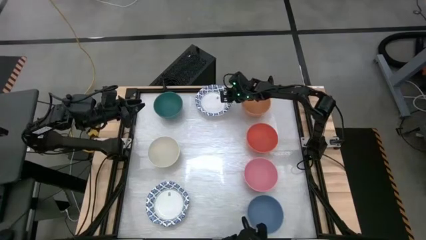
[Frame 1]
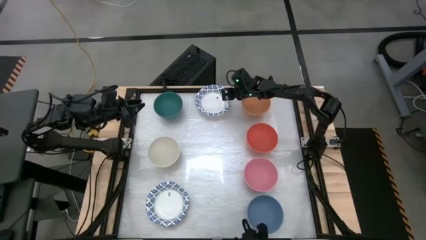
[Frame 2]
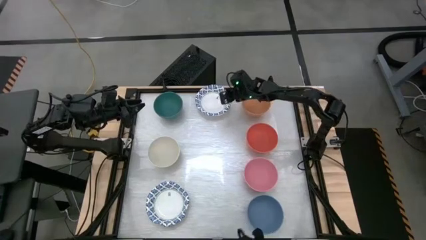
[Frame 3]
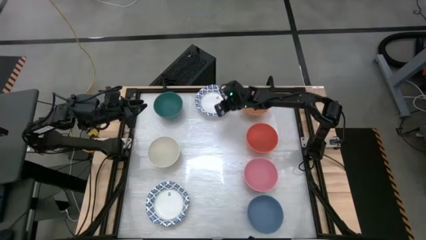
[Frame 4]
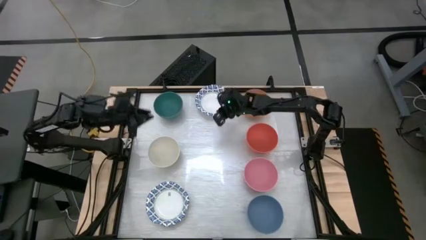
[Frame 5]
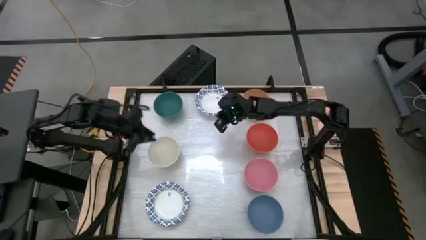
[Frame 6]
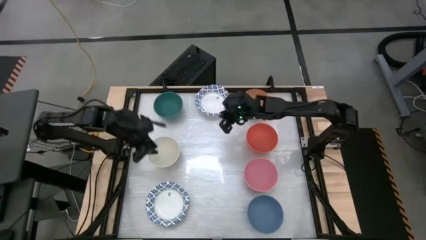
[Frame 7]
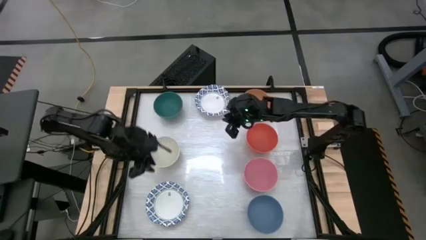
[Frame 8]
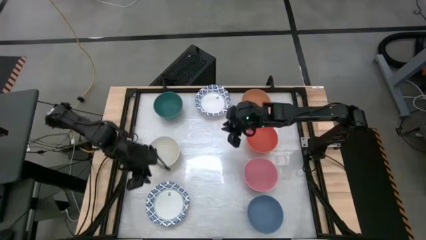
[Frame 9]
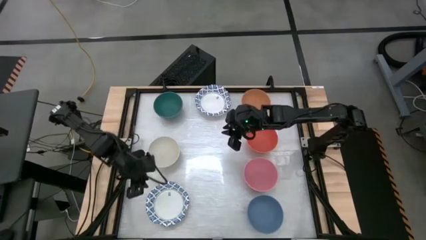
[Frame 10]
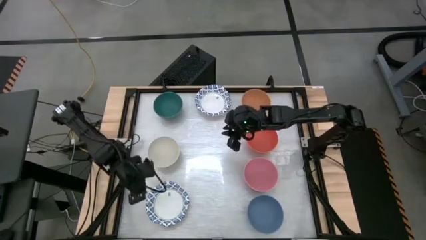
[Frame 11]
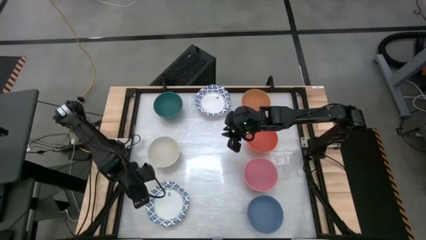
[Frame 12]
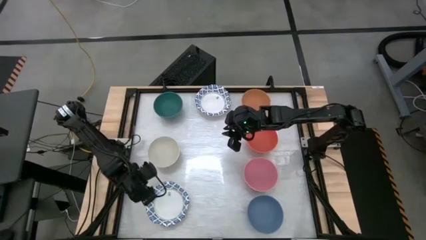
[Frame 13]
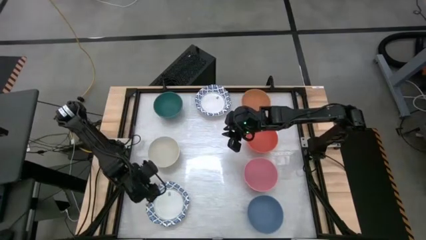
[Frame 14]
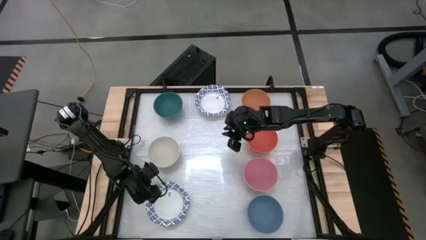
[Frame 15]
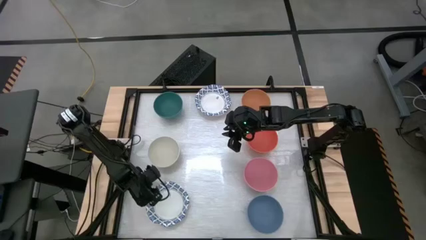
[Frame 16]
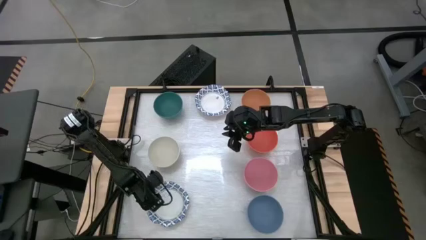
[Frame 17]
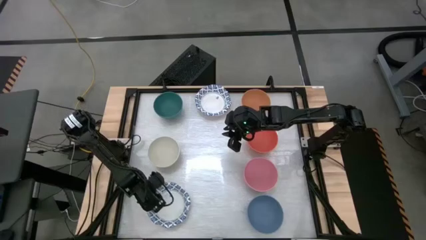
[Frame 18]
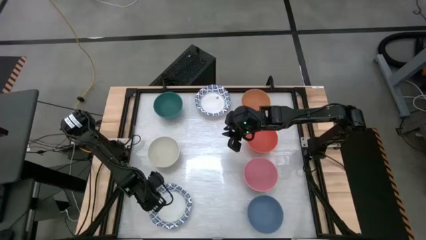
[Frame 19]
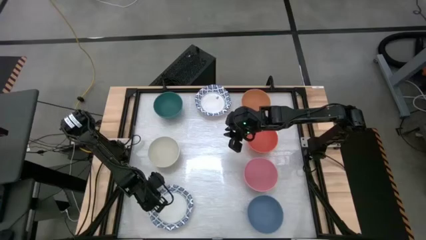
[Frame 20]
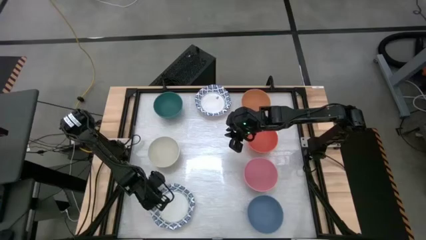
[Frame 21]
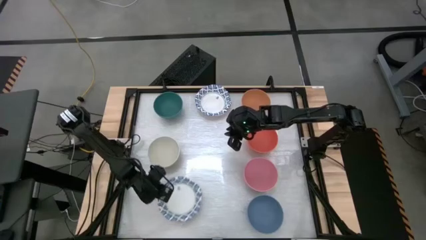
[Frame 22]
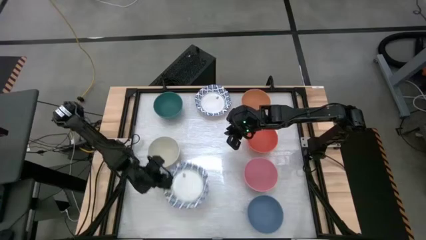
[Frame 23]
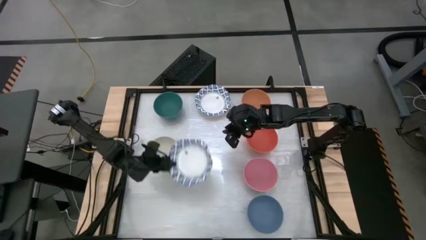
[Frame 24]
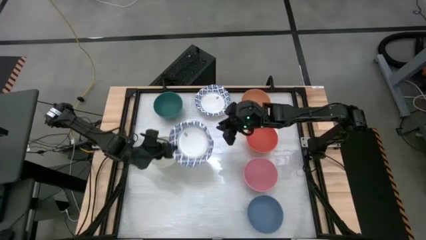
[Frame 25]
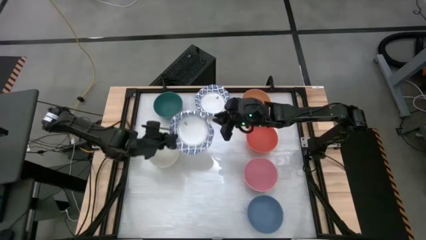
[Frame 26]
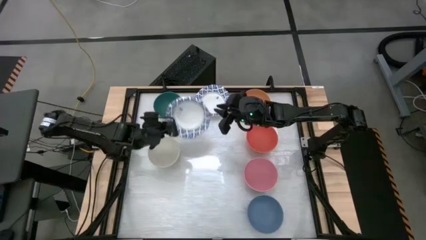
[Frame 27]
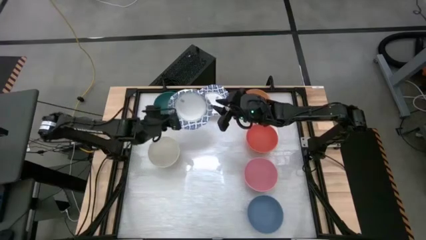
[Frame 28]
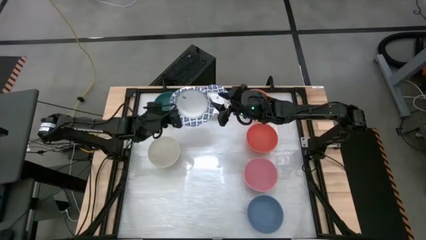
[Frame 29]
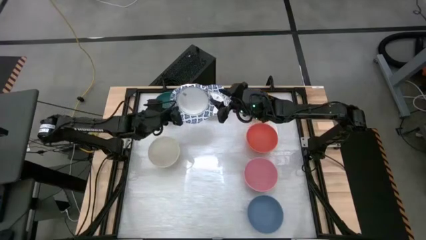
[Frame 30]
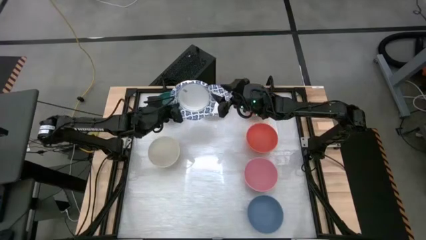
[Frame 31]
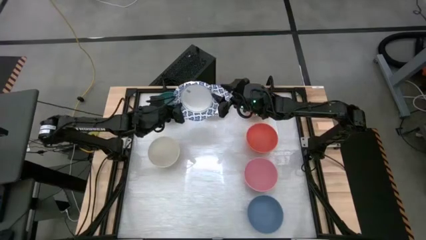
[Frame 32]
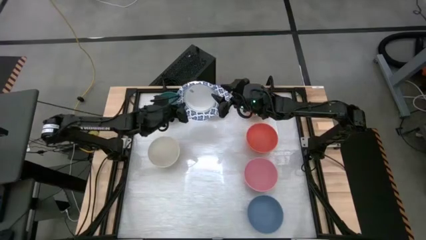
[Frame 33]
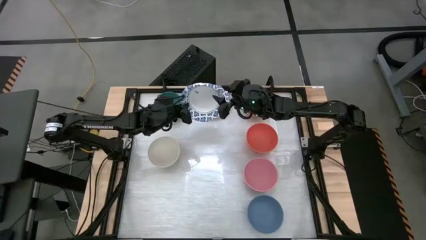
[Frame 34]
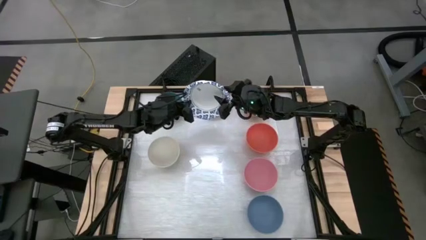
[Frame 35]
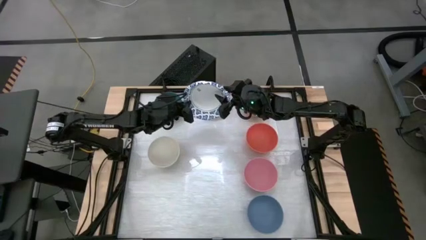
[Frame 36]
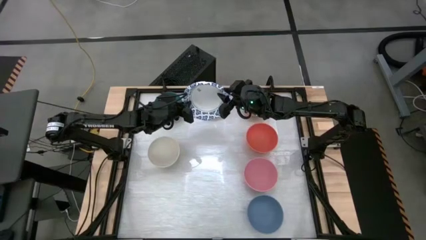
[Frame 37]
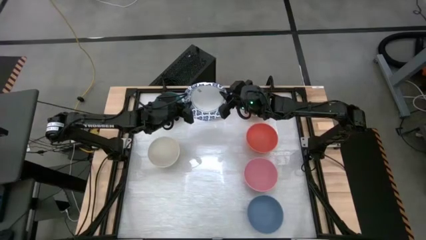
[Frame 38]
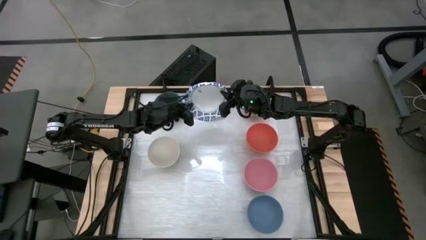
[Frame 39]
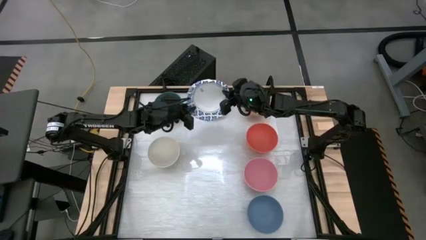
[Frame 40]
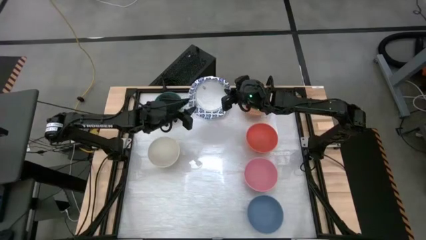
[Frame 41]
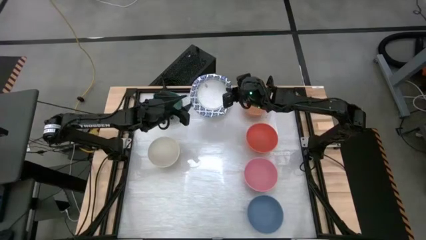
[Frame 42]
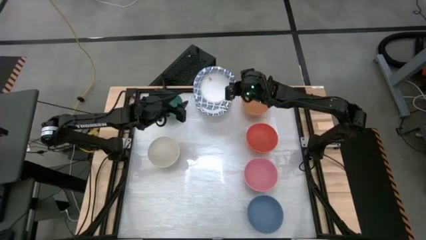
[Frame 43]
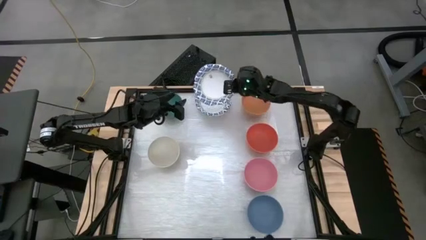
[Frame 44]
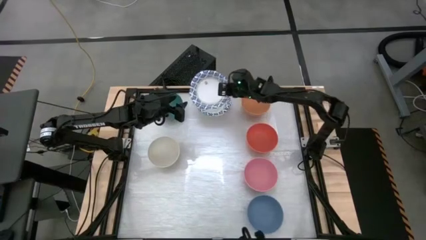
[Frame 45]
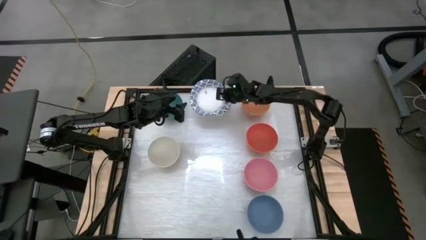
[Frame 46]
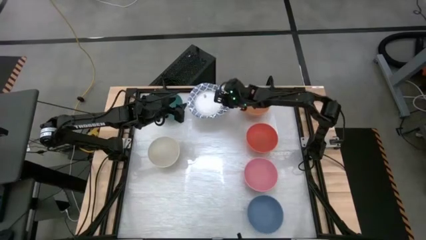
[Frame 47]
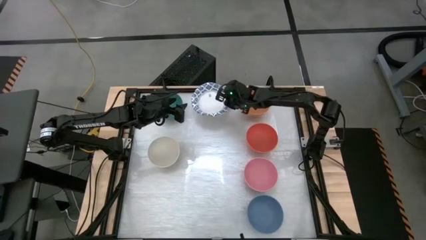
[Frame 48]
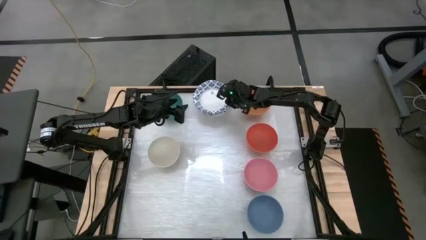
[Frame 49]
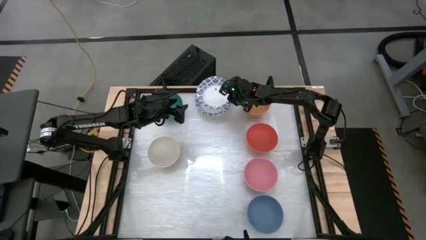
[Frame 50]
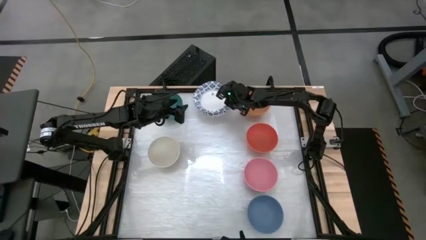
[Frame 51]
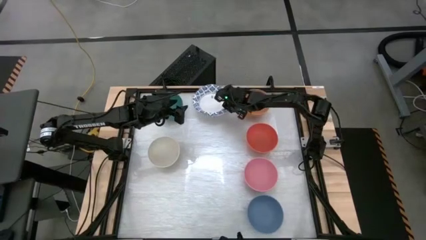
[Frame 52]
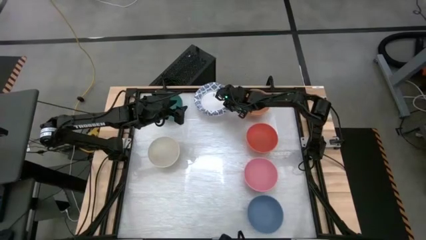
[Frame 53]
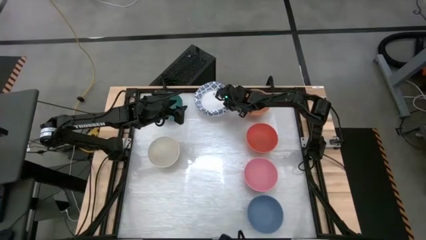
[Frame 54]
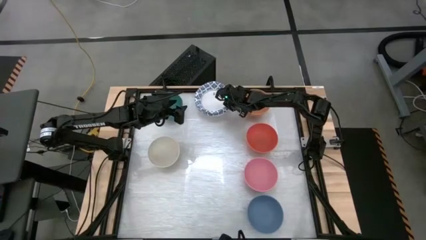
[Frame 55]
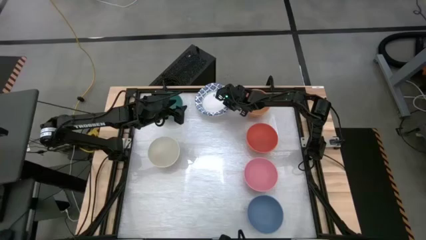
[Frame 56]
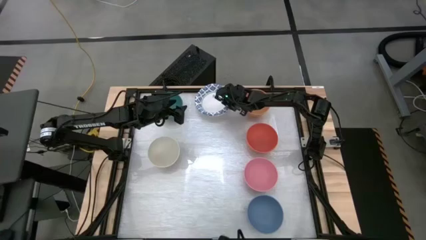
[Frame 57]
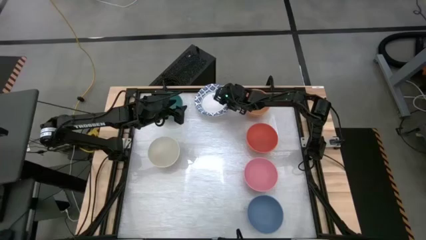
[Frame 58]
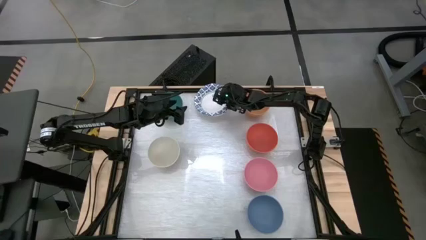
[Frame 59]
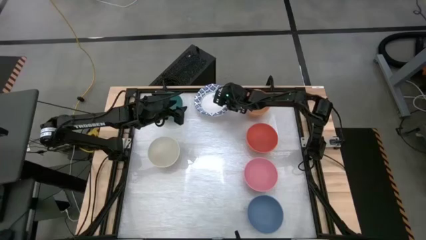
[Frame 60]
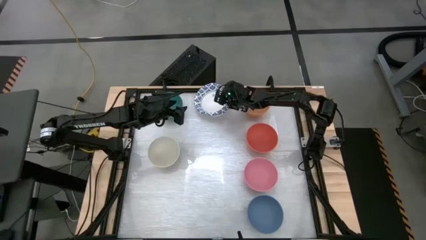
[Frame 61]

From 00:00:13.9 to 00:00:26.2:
Task: Nest bowls inside each other by size order
Stack the bottom white and blue plate on top of the top white and blue plate

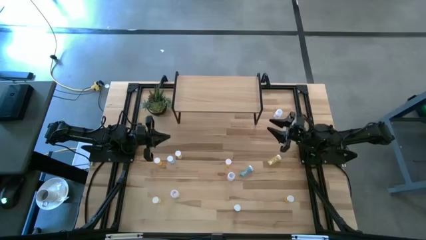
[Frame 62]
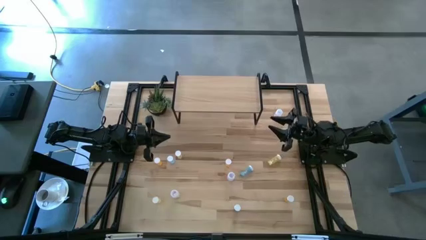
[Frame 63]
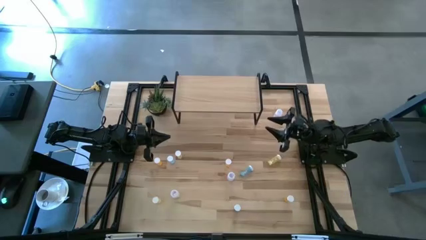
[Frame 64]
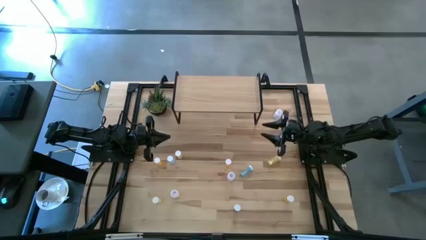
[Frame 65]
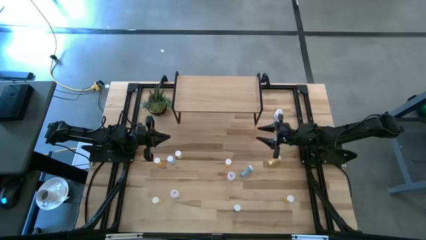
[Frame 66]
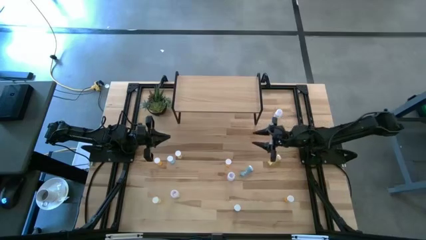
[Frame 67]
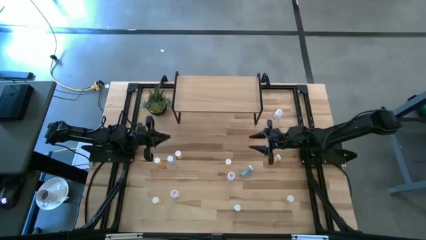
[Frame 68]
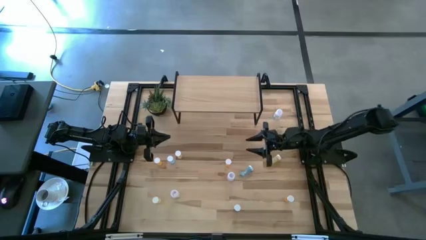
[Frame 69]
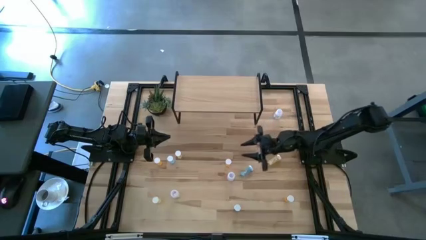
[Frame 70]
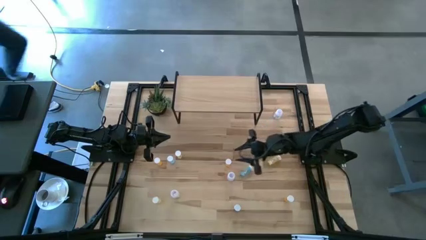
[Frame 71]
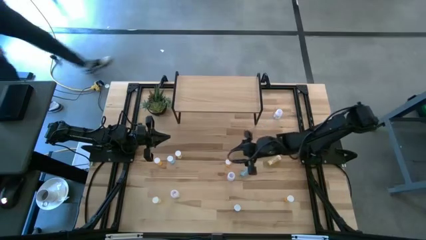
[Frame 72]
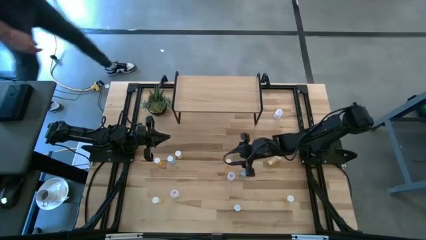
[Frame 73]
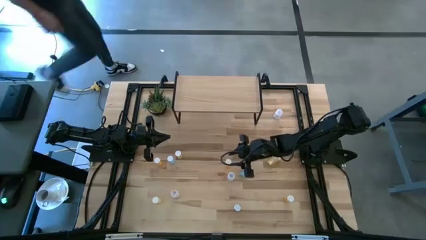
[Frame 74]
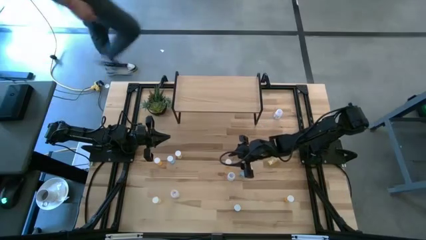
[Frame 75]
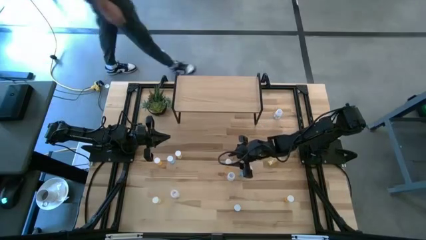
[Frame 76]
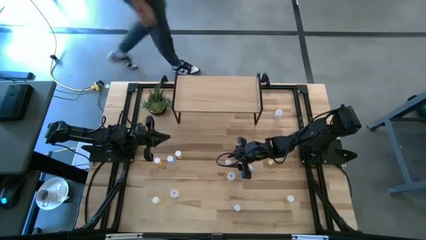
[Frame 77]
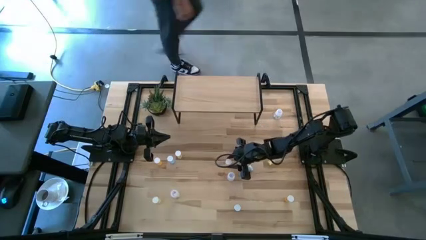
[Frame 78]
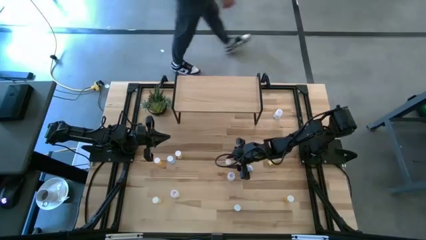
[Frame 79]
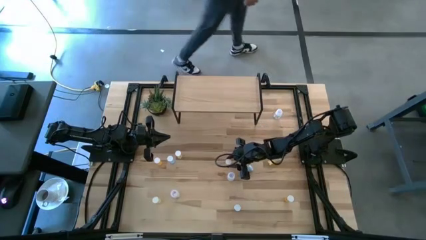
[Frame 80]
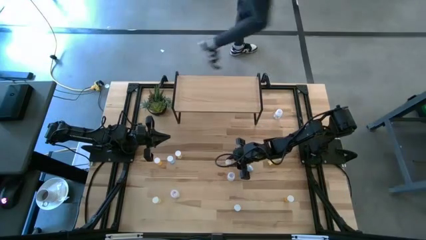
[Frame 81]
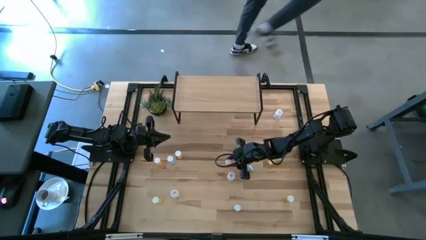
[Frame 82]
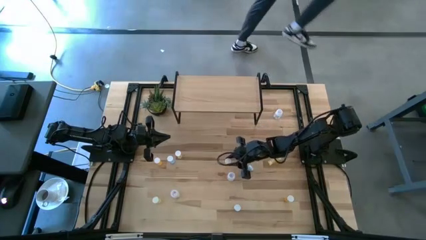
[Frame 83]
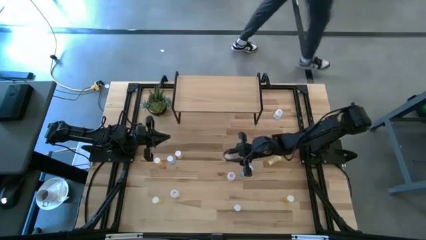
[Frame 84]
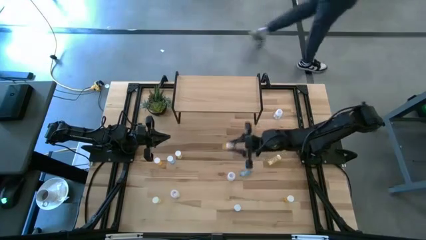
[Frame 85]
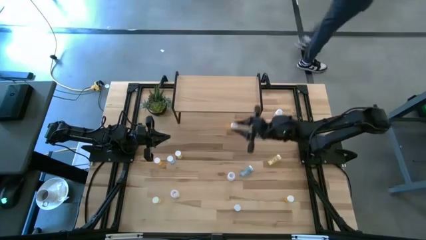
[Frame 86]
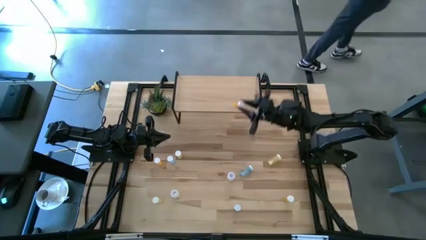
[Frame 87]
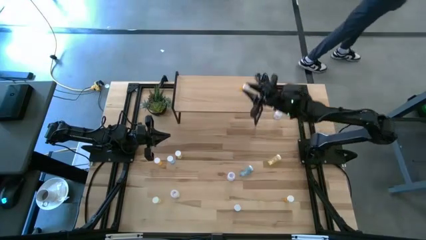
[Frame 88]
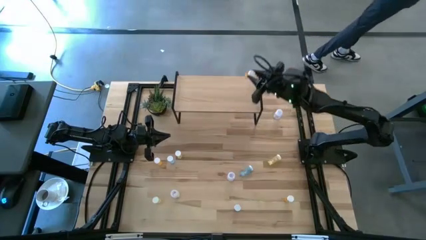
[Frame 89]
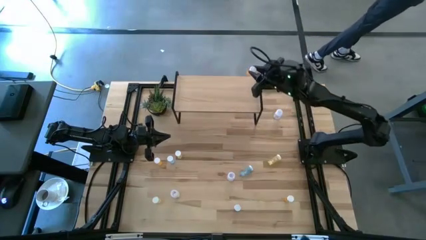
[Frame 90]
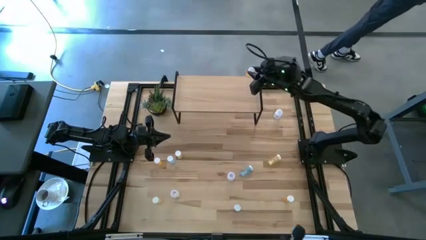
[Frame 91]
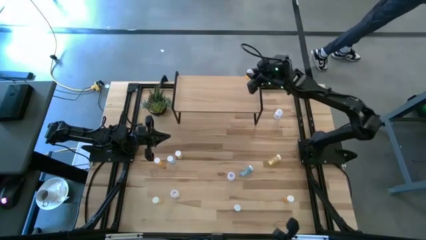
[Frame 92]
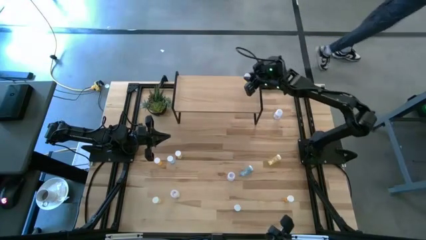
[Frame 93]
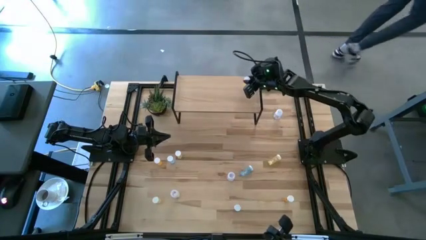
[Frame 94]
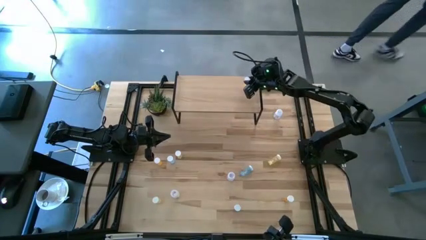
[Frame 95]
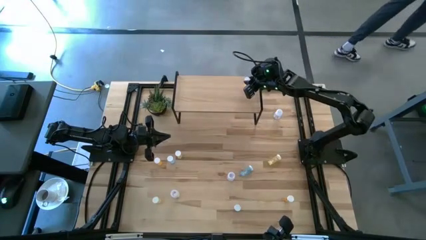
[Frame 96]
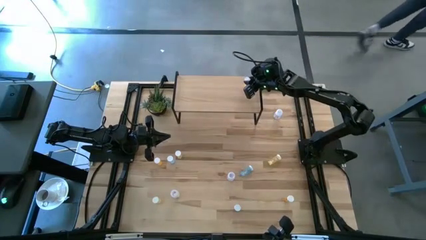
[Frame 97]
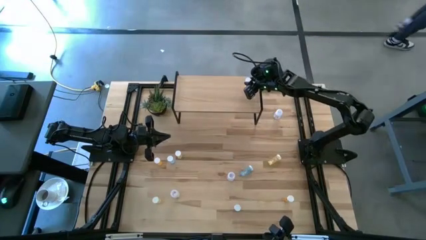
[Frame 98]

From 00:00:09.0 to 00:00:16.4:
Task: Pick and place medicine bottles onto shelf by color
Put the middle orange pill bottle on the shelf
